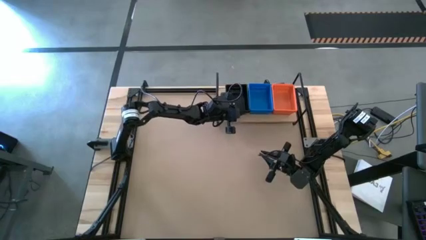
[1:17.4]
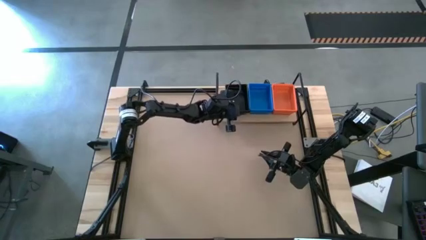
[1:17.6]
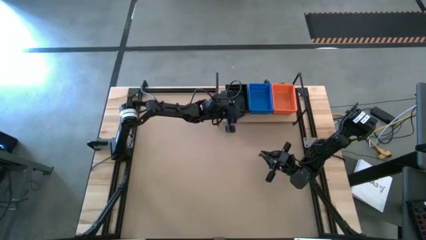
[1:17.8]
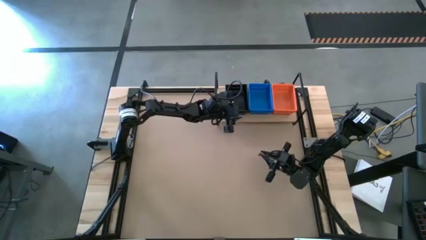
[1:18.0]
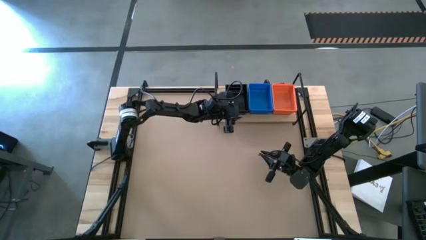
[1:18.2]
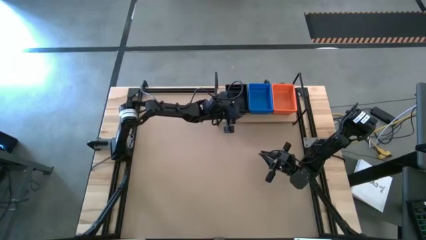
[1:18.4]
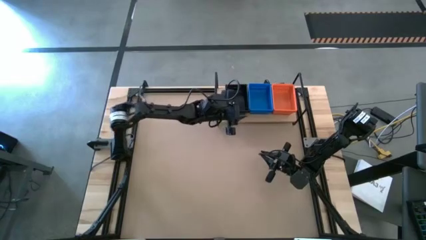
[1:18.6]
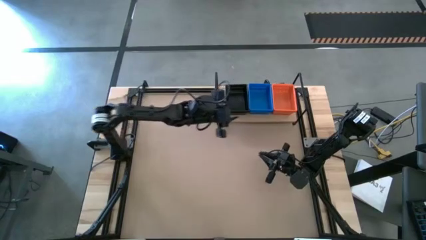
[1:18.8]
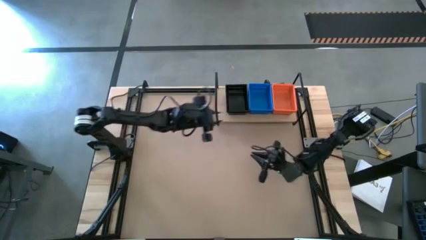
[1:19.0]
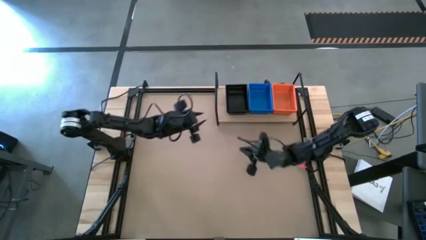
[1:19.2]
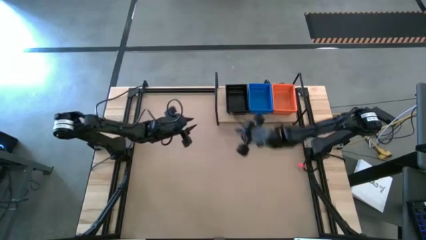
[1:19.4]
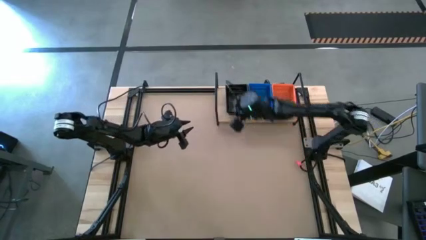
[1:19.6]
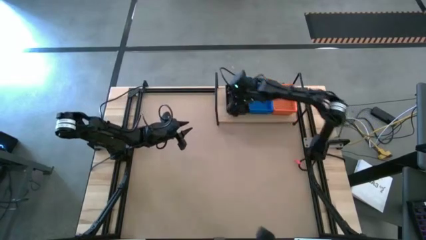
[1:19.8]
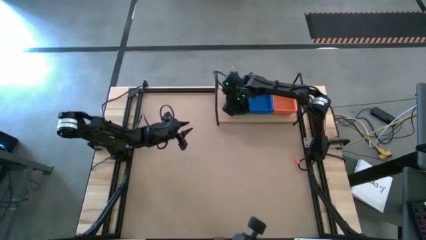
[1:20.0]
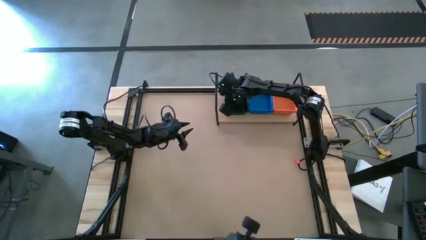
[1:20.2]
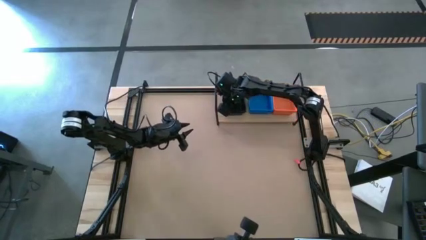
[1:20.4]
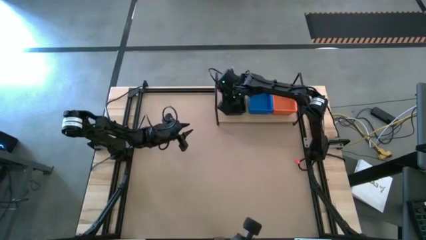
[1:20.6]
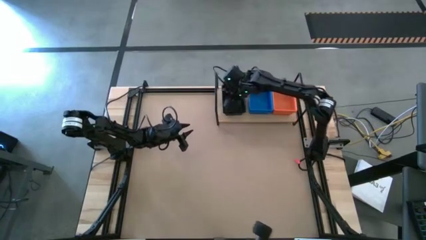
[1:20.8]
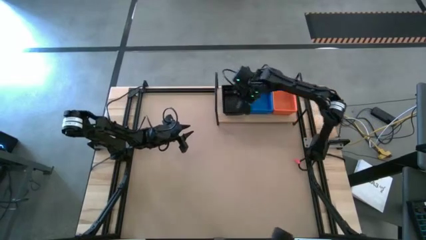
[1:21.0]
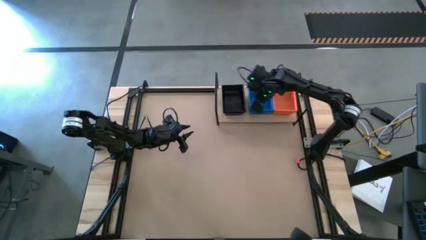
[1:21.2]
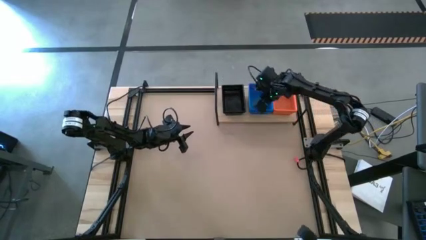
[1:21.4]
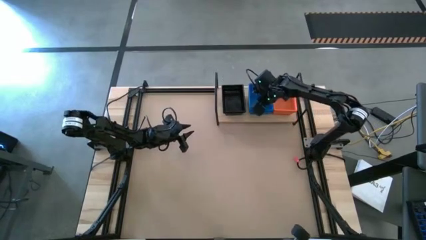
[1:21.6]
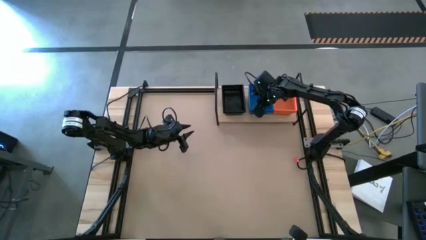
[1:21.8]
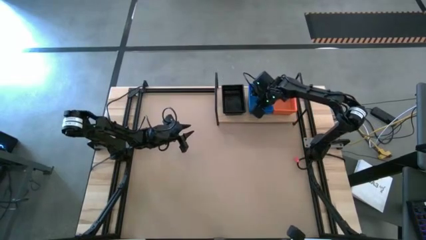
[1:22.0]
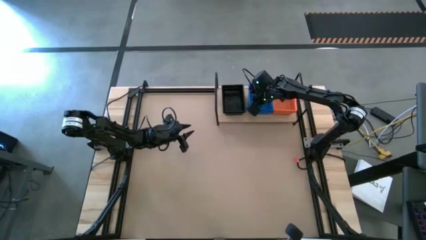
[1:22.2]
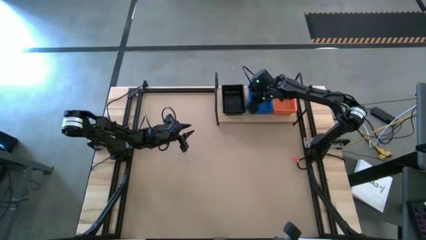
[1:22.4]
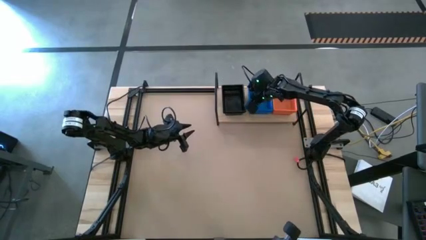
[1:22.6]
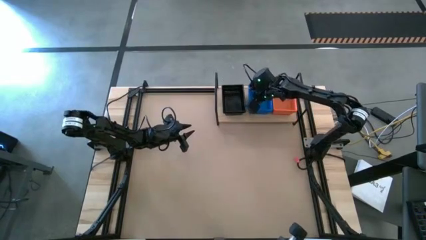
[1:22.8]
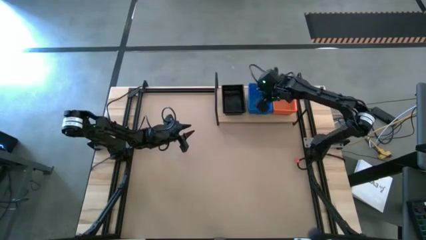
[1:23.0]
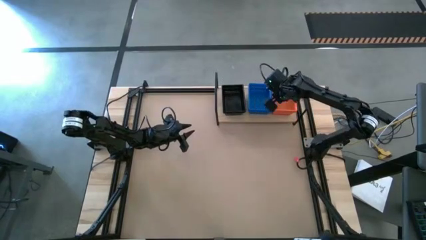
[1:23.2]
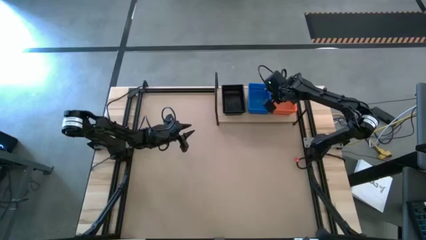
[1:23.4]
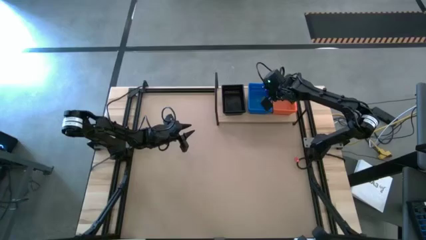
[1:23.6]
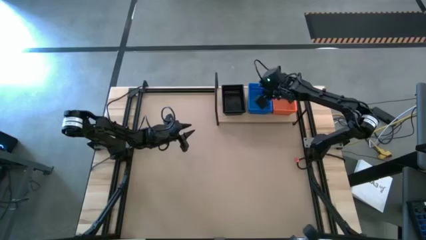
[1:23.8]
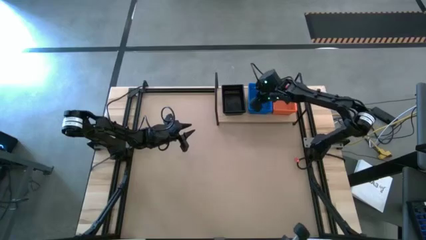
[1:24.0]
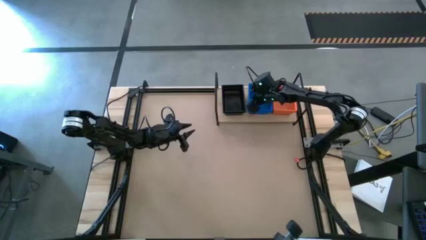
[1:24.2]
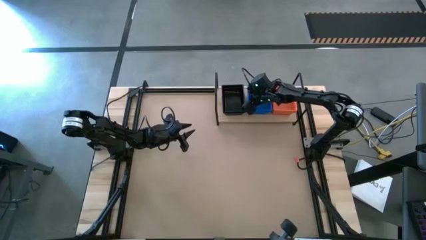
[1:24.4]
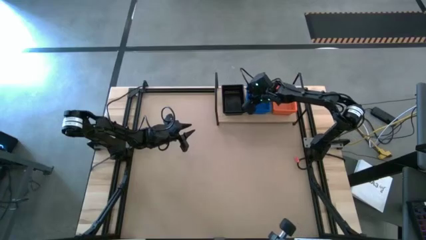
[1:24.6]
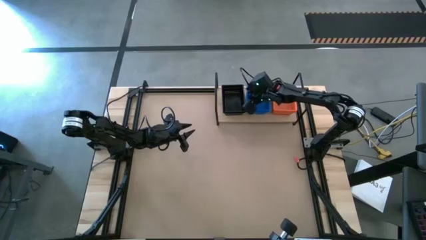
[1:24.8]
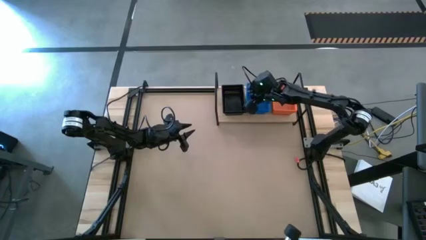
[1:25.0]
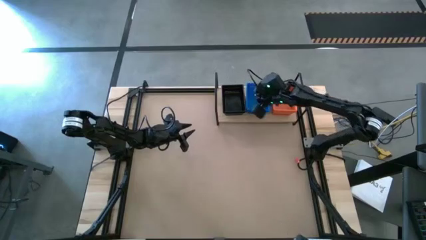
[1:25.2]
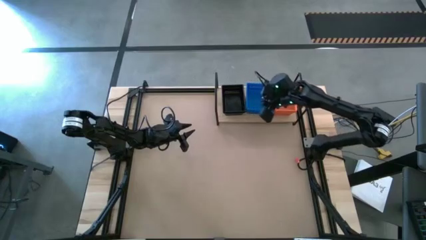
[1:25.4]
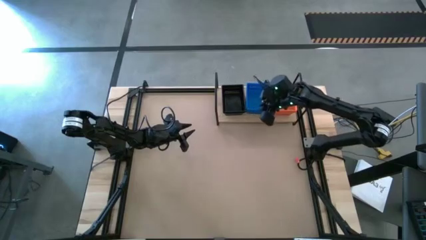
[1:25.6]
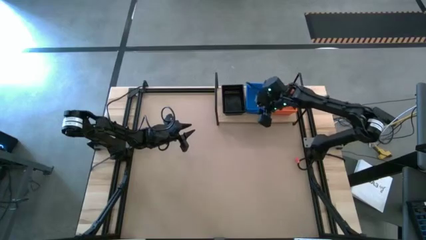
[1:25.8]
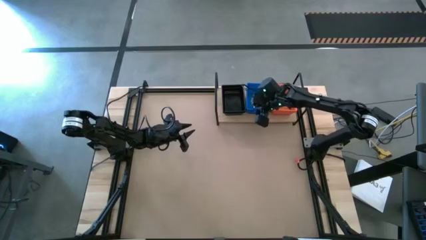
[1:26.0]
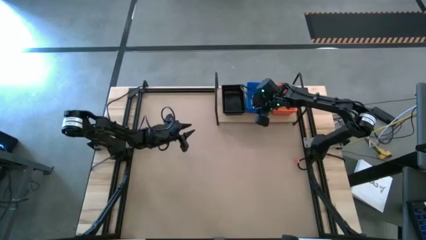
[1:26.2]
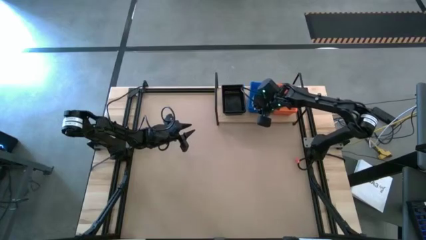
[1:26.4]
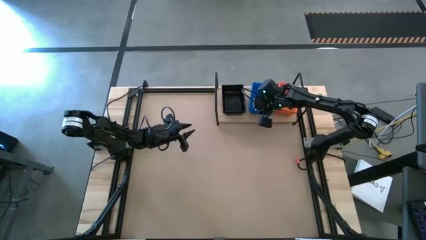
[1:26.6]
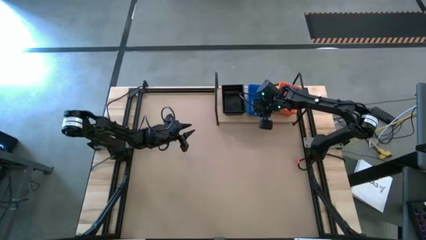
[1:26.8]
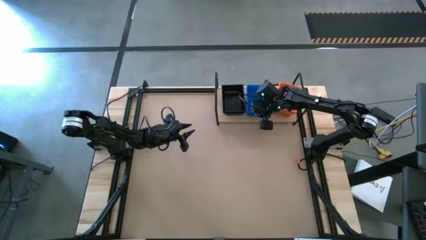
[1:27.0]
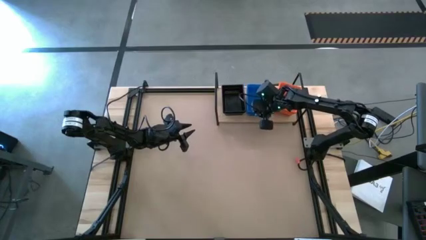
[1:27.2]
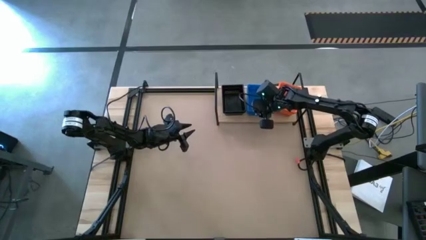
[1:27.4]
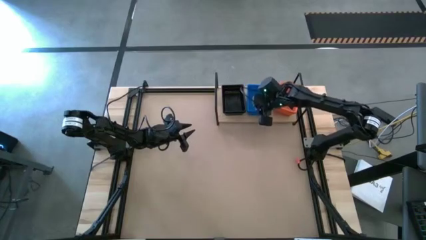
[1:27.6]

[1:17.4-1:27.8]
Task: Stack baskets on shelf by color
Adjust the bins on the shelf

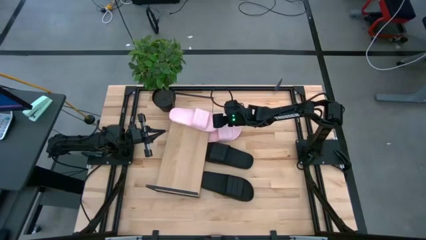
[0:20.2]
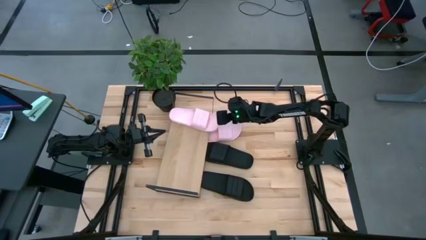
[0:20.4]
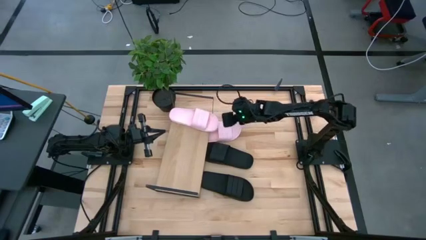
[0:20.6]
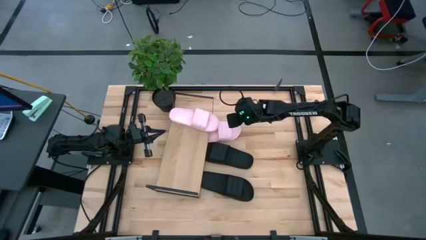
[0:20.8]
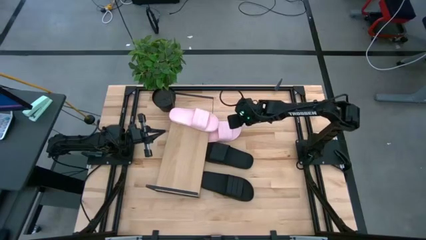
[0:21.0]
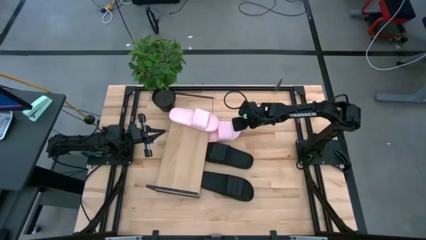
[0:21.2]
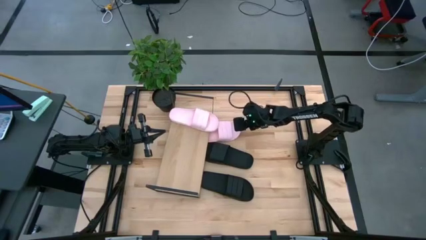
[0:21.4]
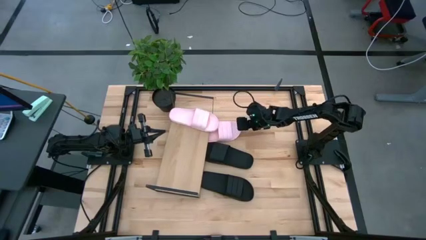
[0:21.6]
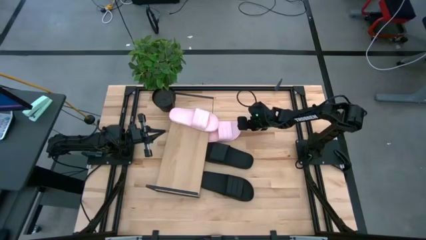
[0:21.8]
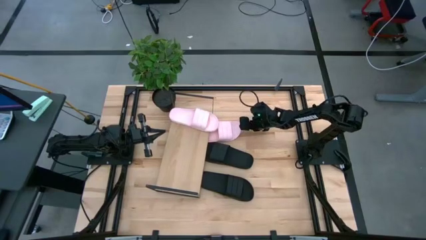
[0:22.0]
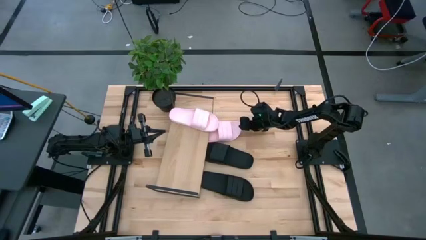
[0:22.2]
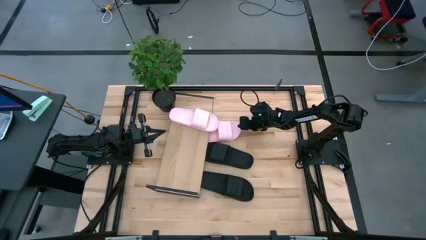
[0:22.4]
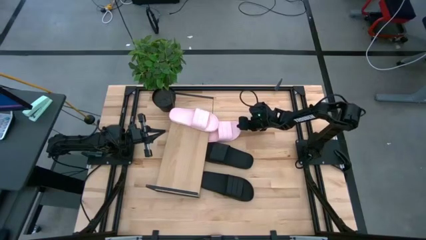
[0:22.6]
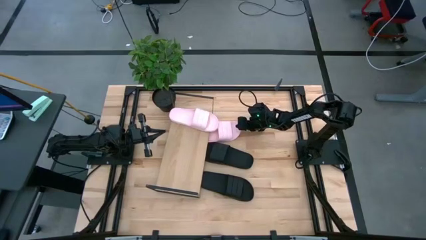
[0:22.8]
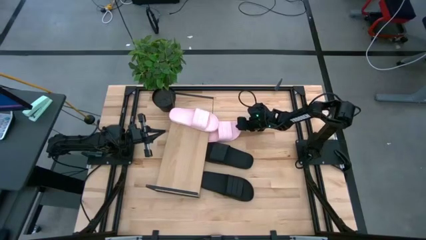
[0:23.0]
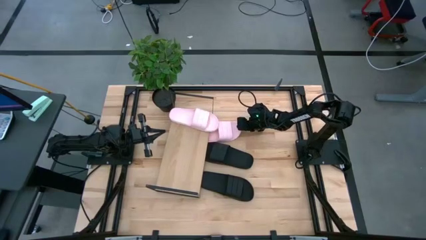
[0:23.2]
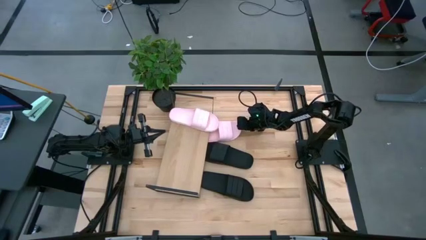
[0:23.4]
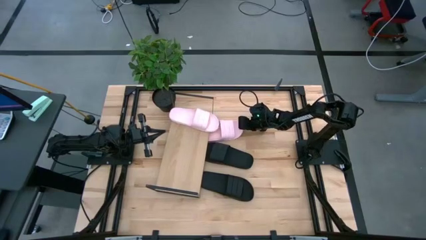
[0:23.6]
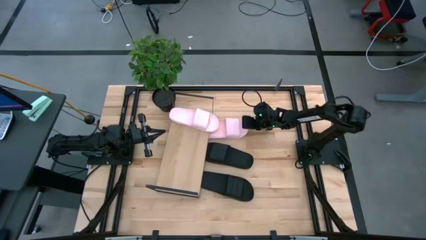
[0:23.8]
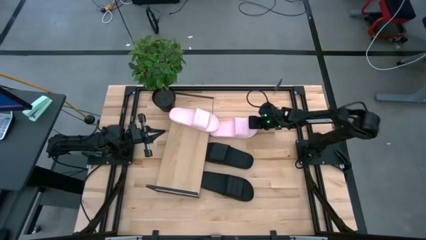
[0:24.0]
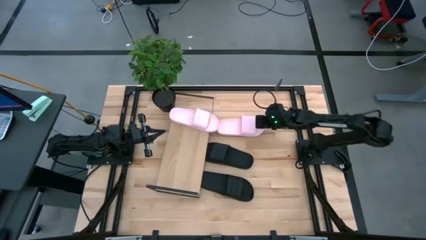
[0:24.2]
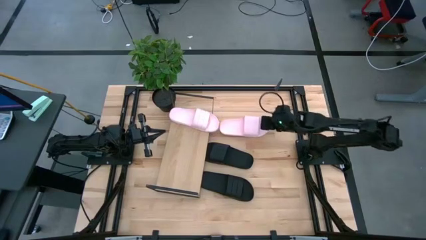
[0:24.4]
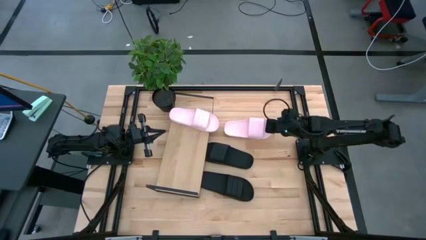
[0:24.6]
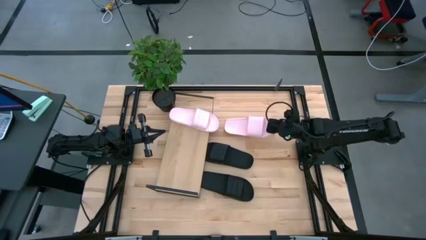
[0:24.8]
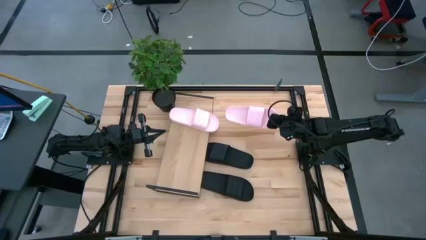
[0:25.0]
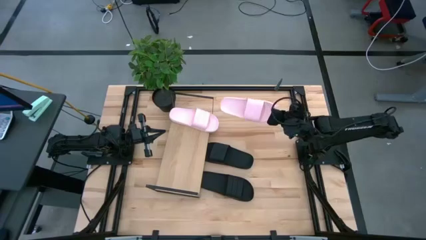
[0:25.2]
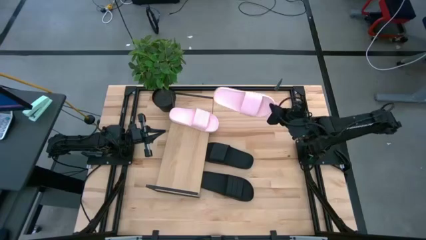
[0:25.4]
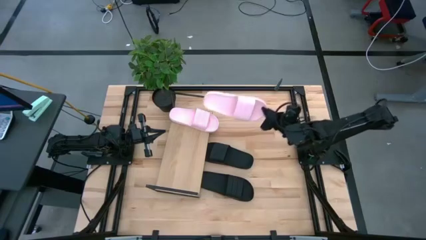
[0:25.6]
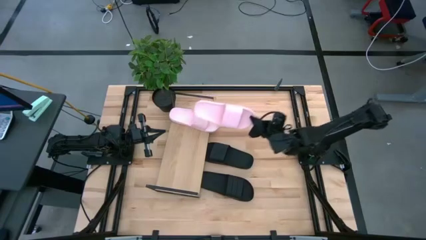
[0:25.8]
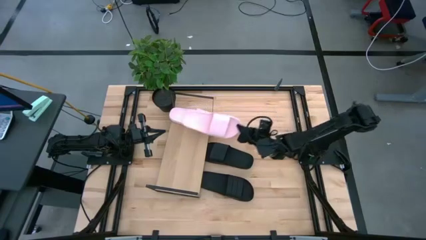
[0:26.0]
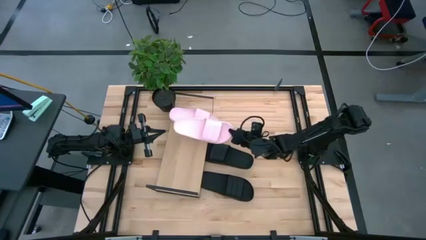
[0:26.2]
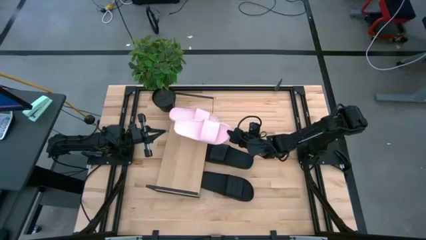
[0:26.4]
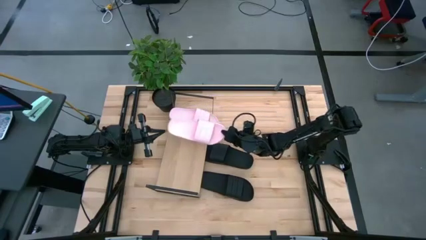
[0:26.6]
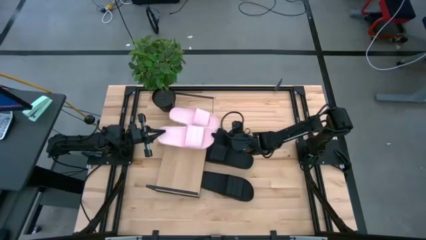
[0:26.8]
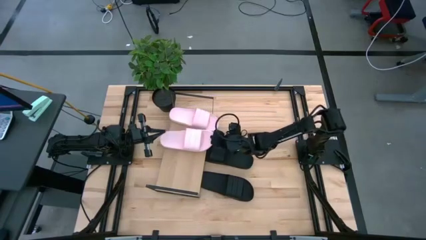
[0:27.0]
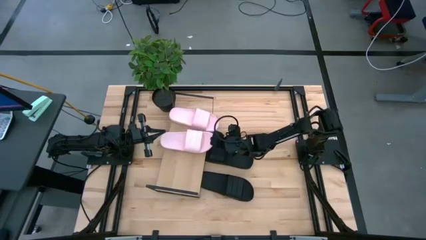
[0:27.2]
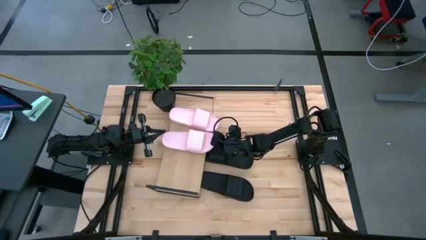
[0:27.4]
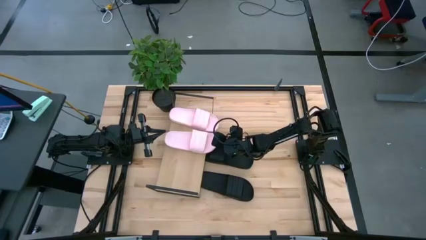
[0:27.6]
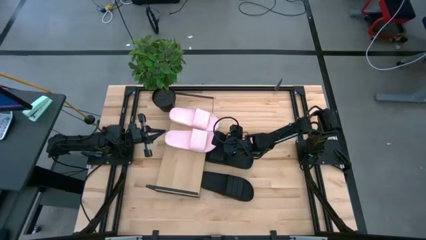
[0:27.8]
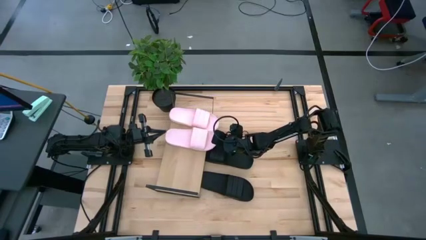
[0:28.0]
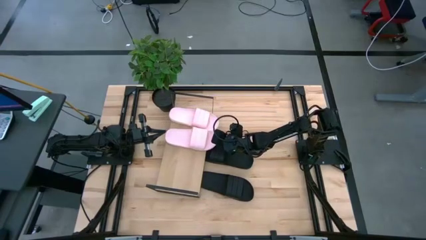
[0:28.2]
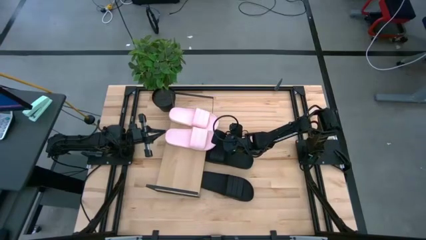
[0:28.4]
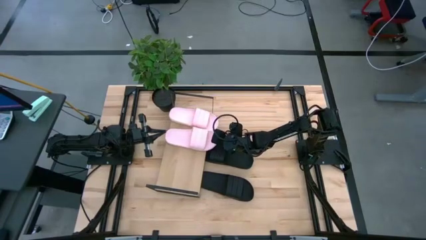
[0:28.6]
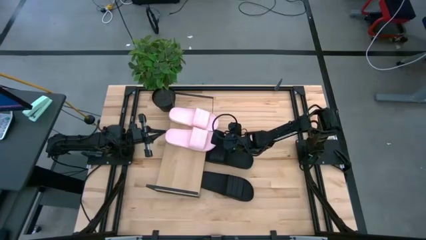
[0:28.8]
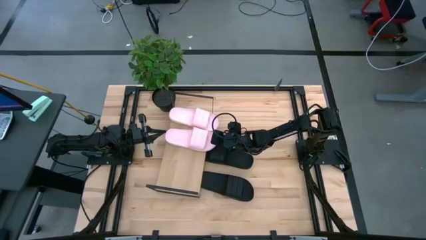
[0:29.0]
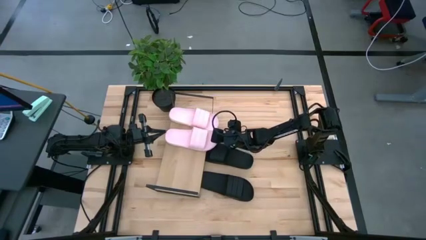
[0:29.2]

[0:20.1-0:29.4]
Task: Pick and place slides into the shelf
Put the pink slipper on the shelf
